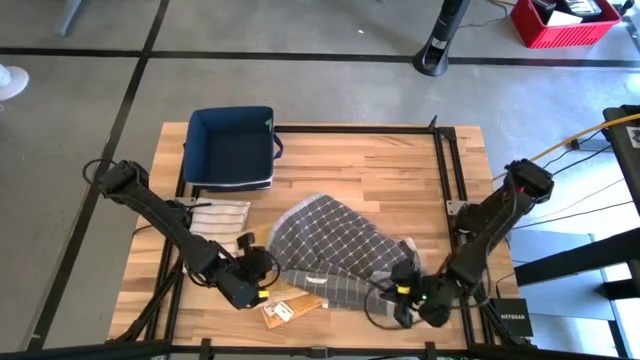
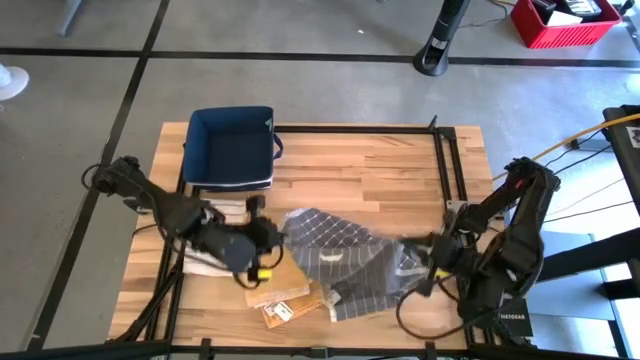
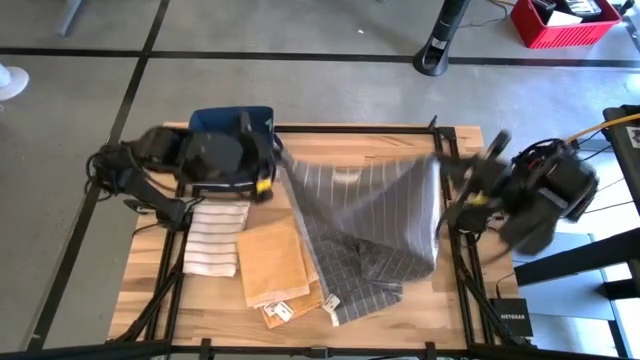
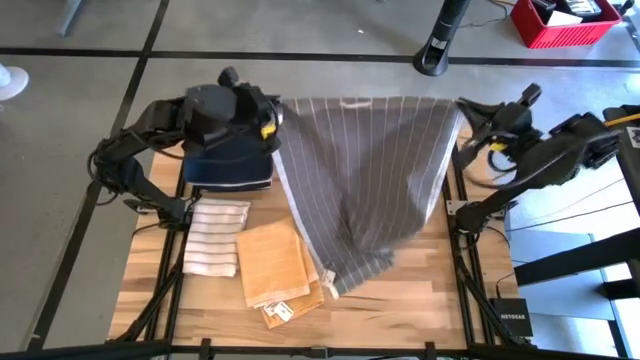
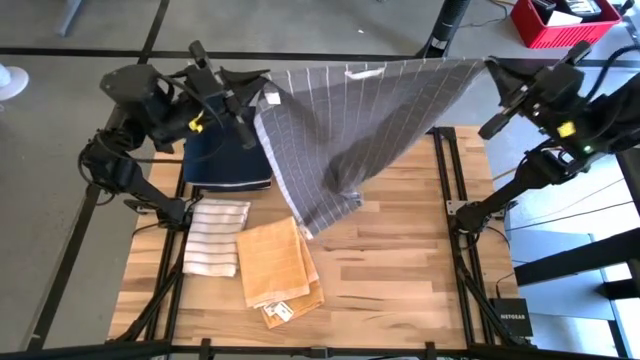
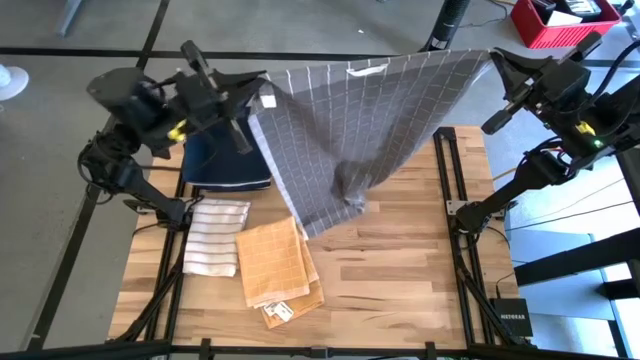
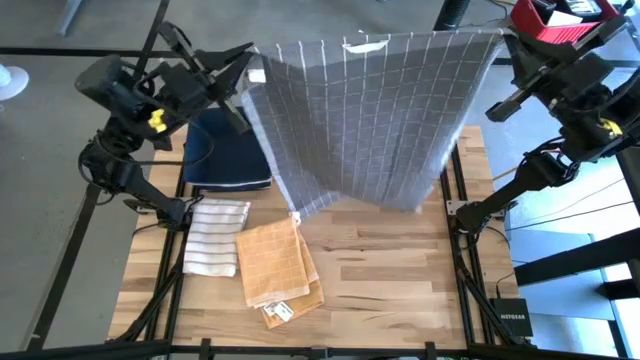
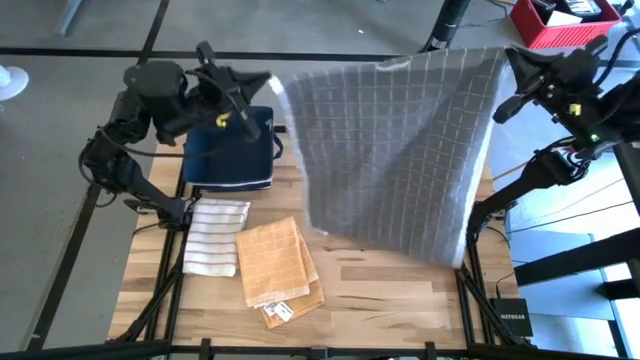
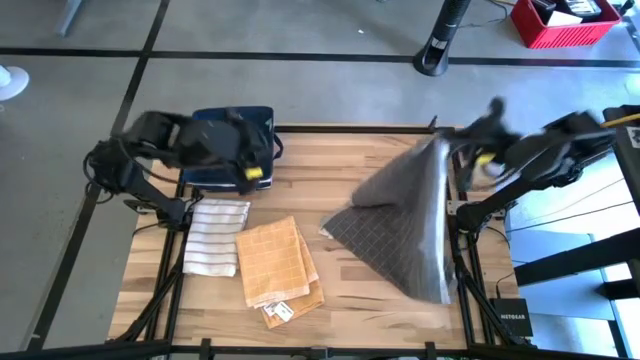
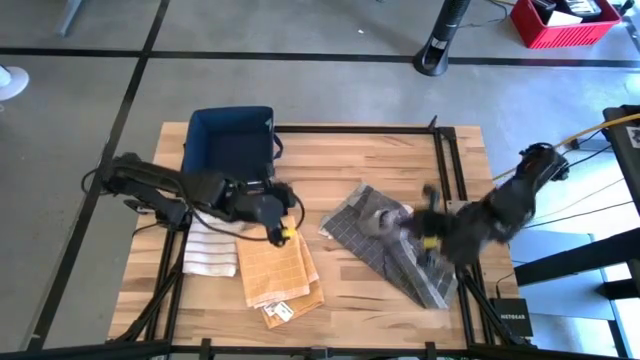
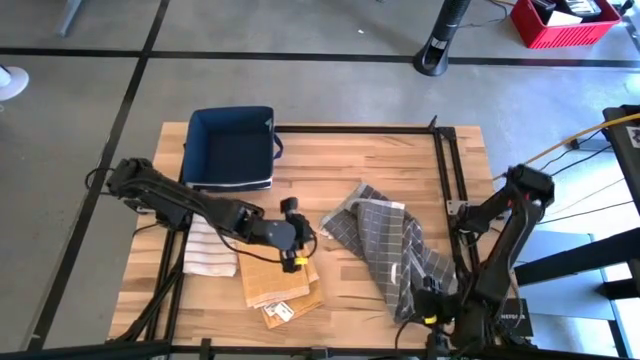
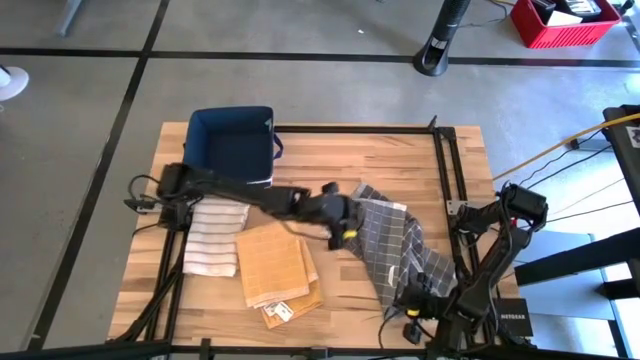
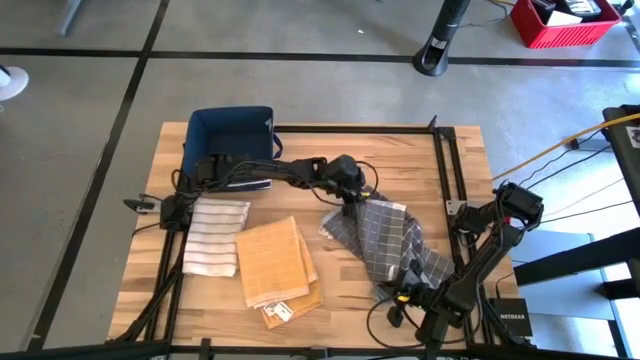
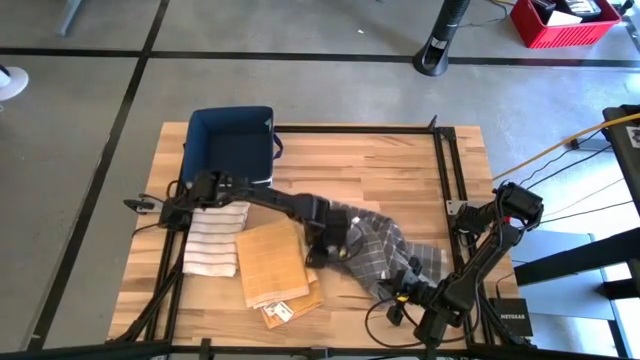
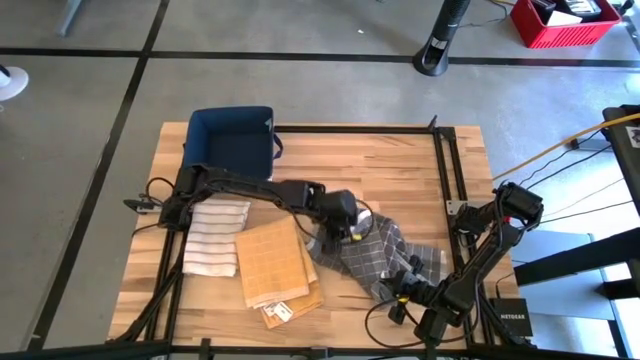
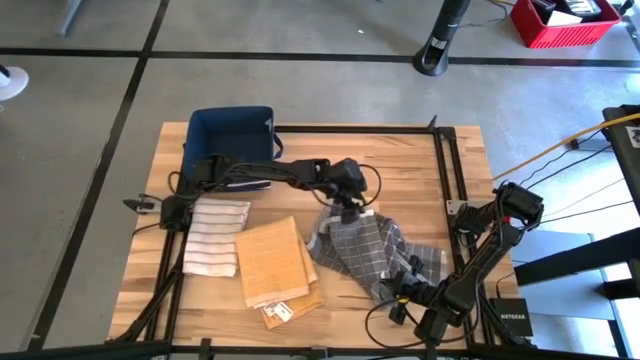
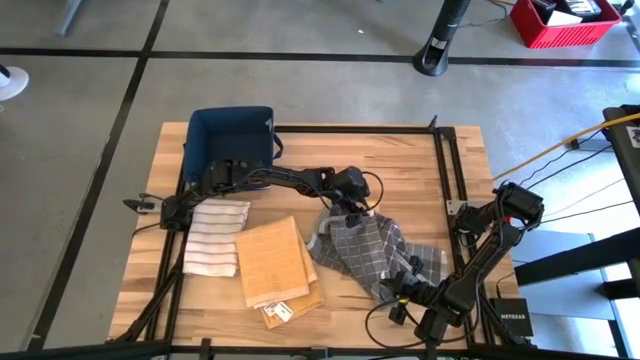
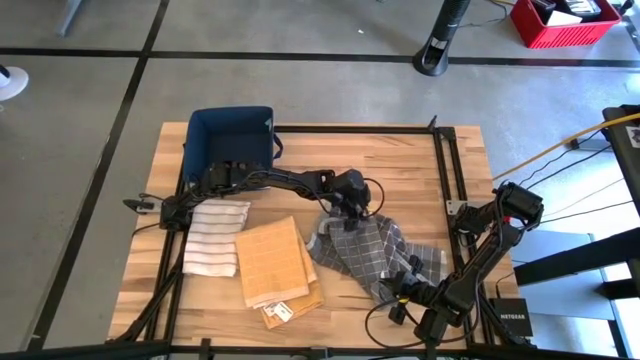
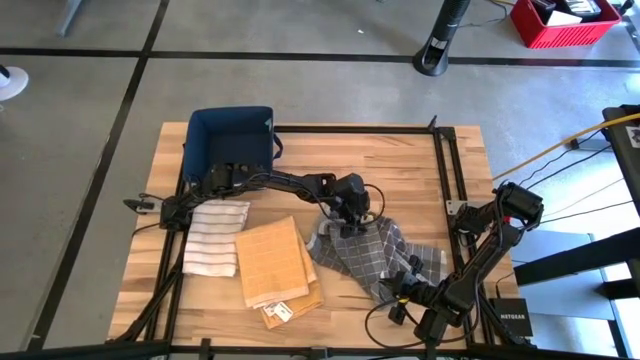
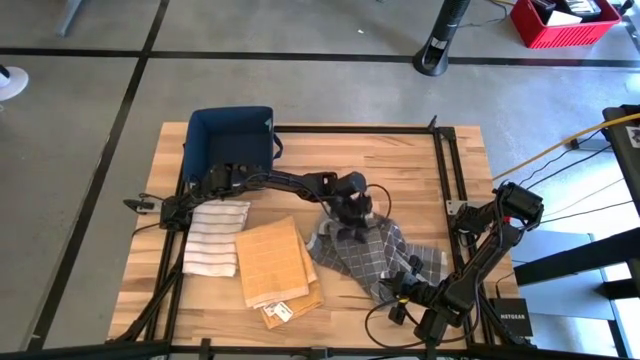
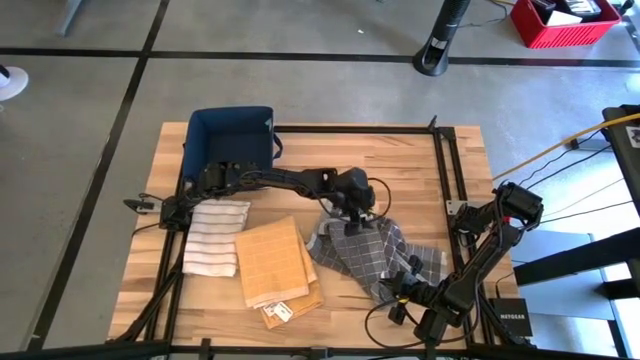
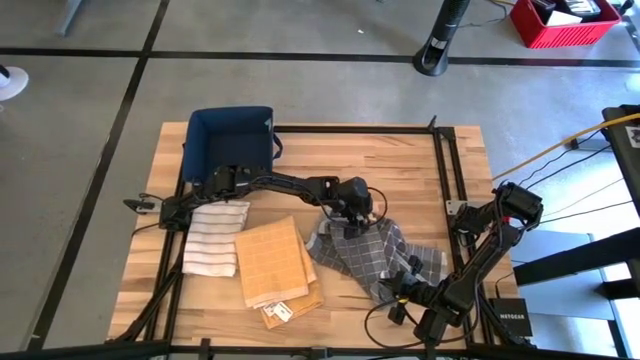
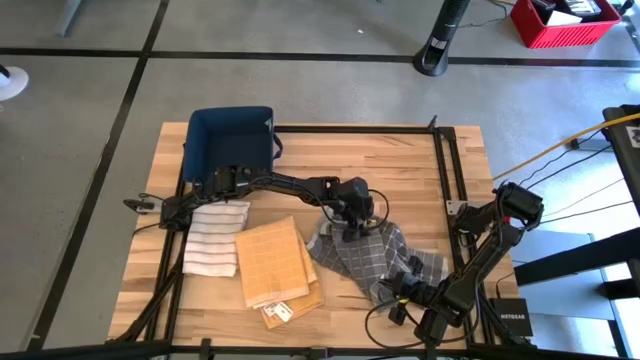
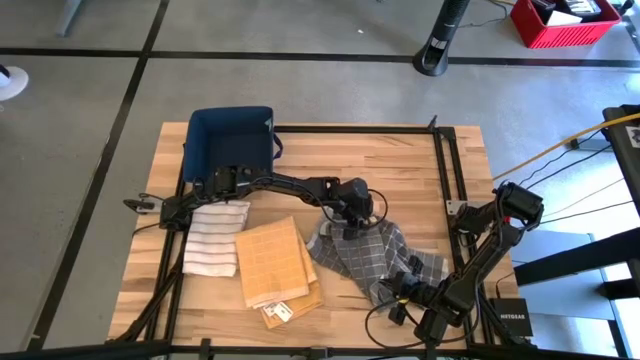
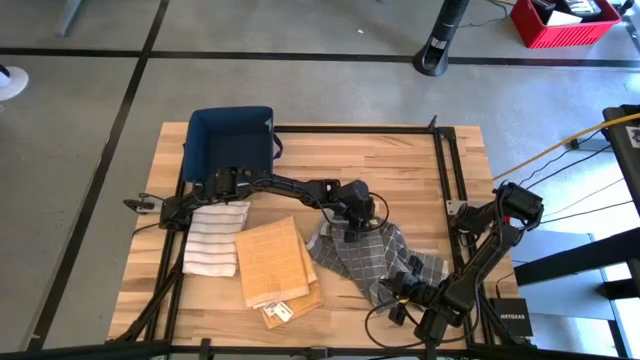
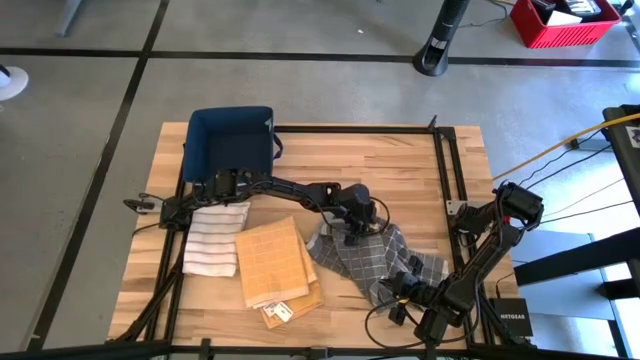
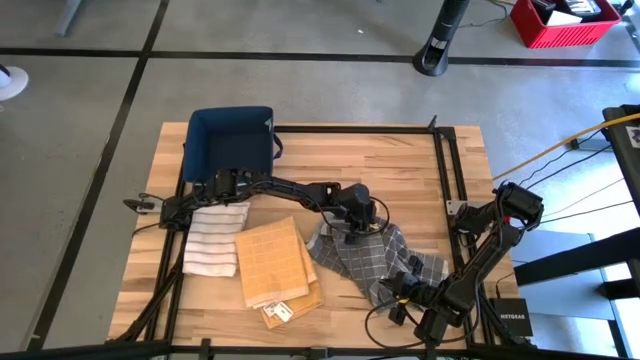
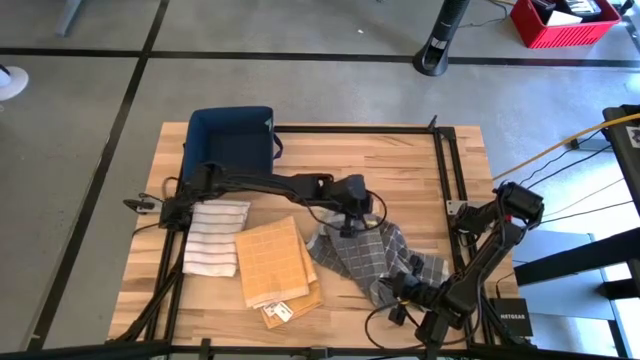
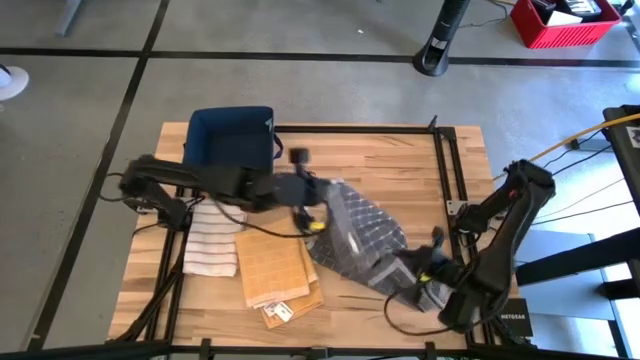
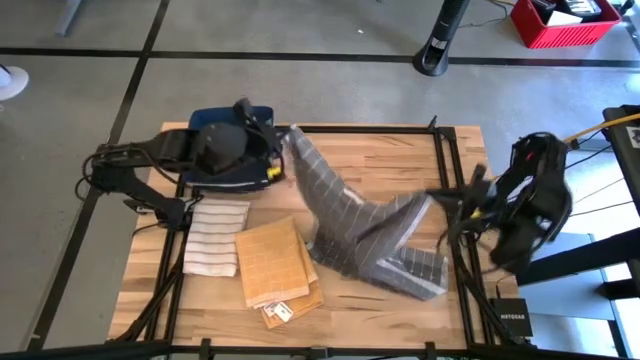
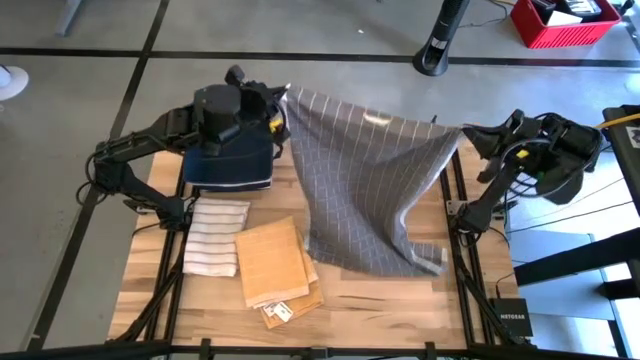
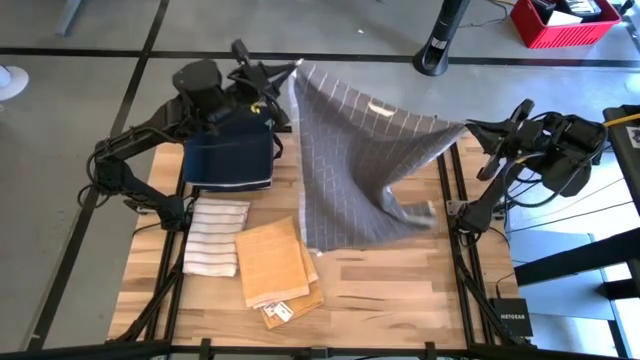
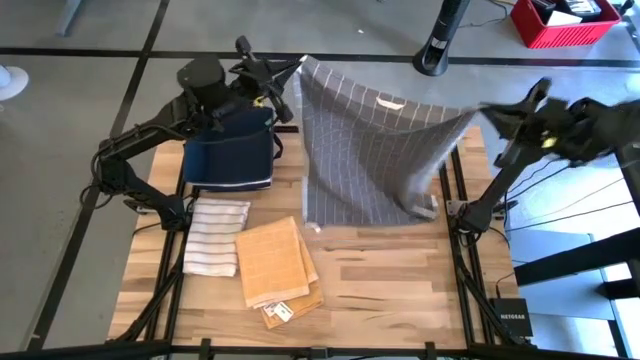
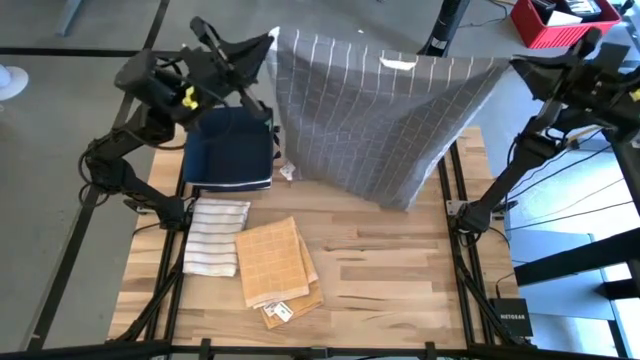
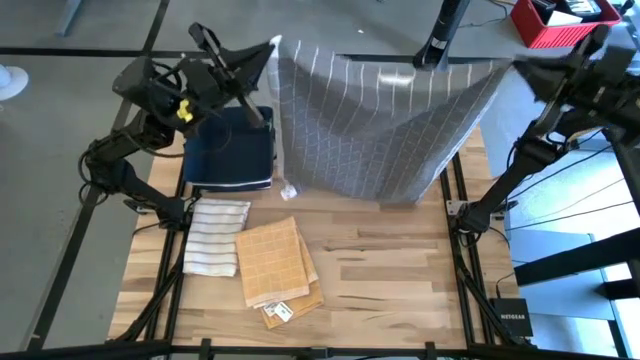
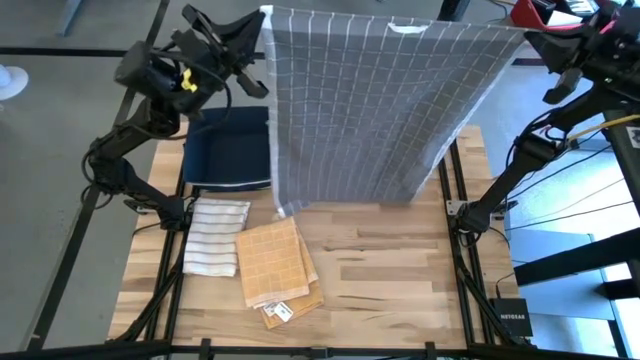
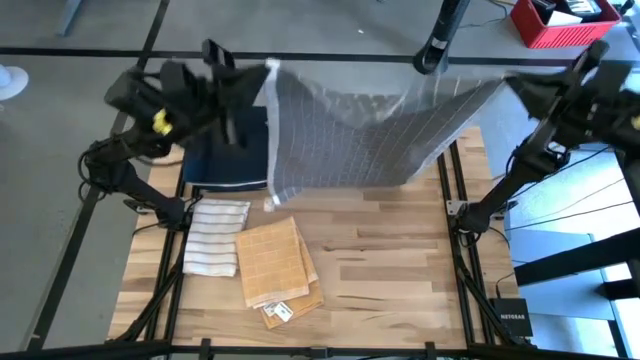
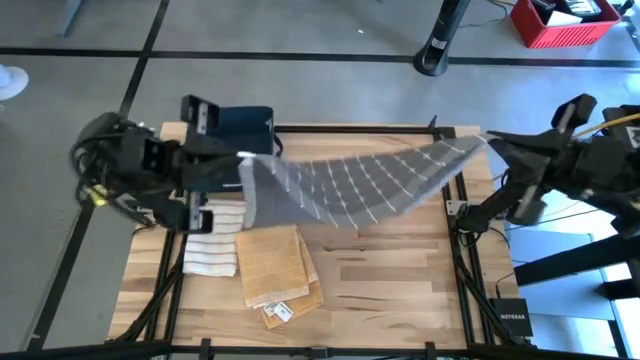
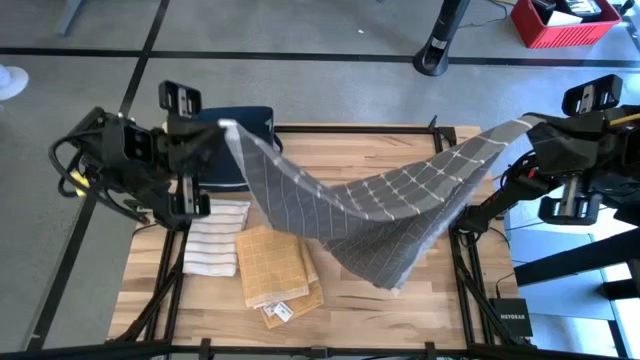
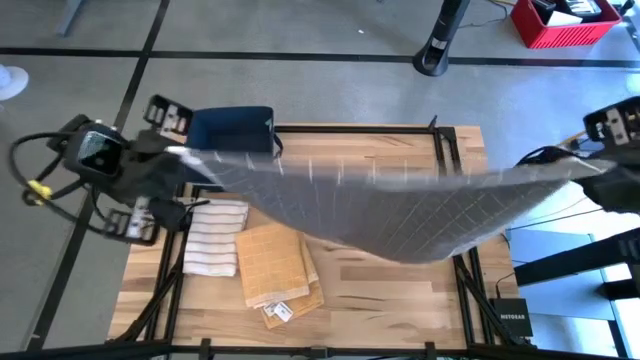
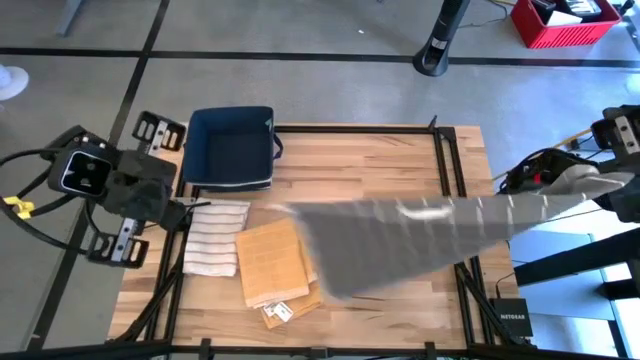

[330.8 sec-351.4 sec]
Task: Fold towel
Fold the gray pattern towel
